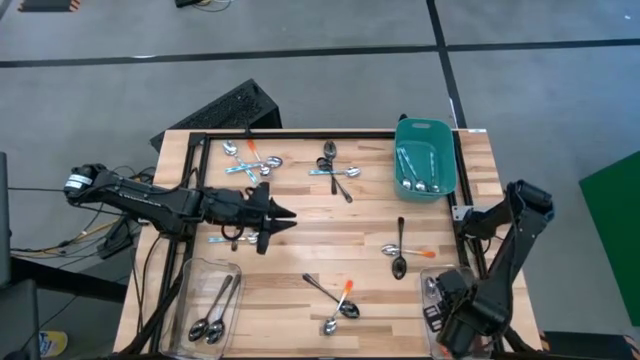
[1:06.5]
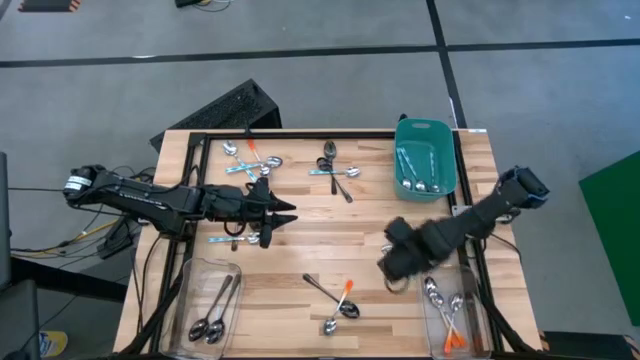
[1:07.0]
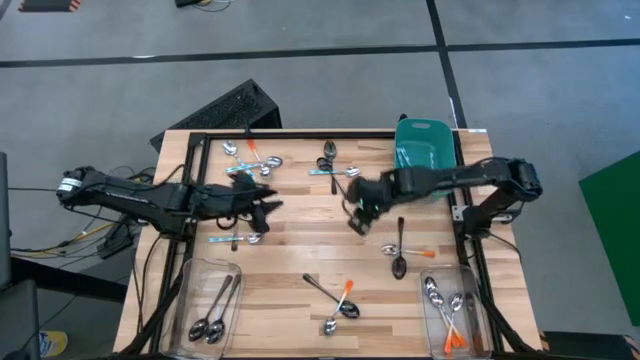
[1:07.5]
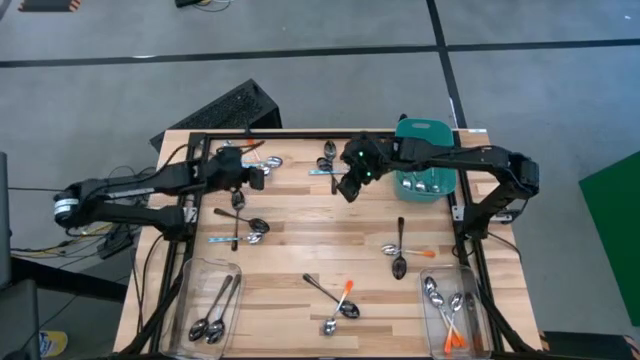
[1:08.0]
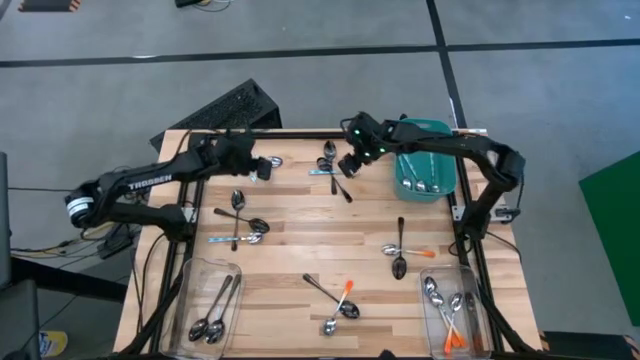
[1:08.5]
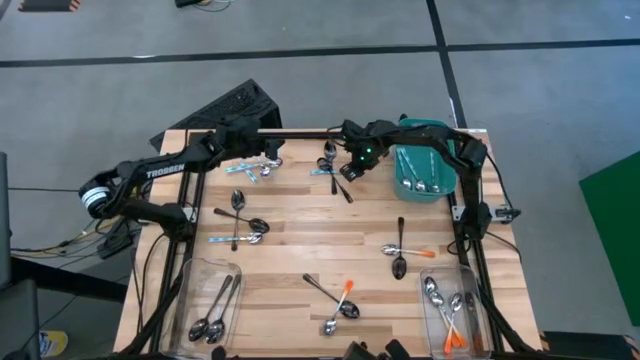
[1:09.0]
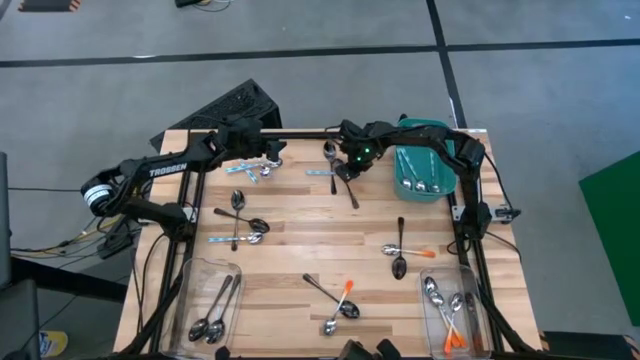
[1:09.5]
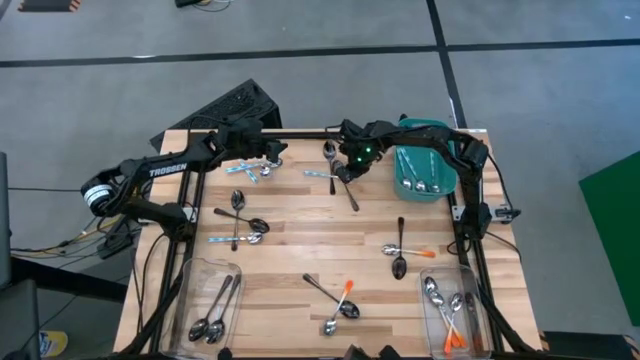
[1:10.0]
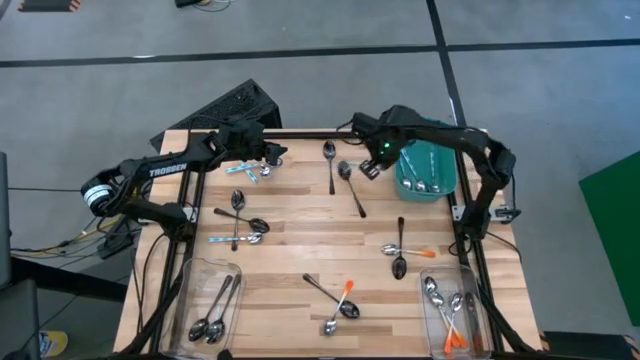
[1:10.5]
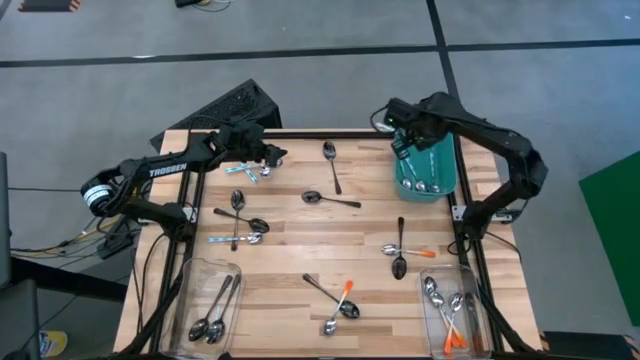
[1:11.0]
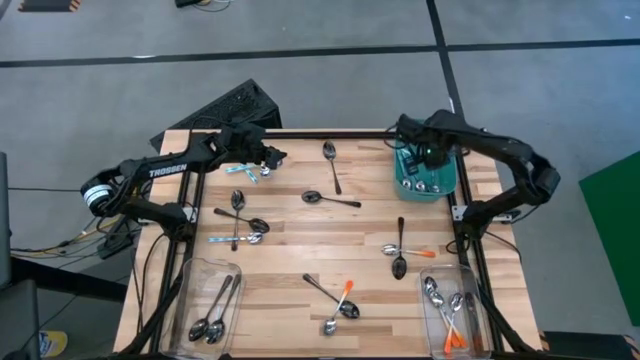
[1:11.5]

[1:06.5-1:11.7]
Task: Sort silverware by color (type)
Put the blue spoon in the blue bin

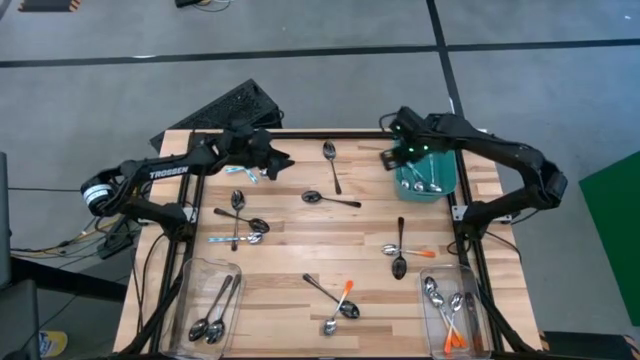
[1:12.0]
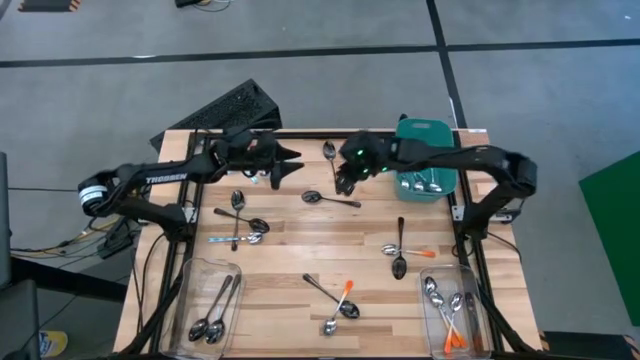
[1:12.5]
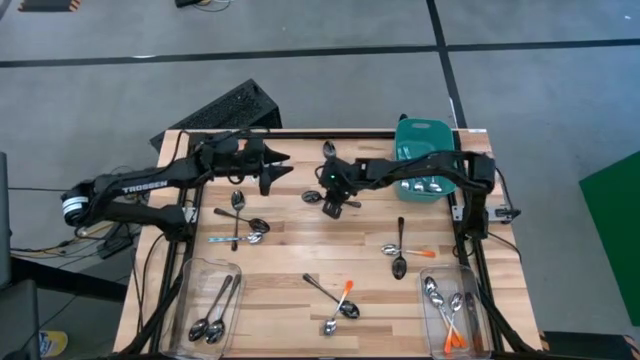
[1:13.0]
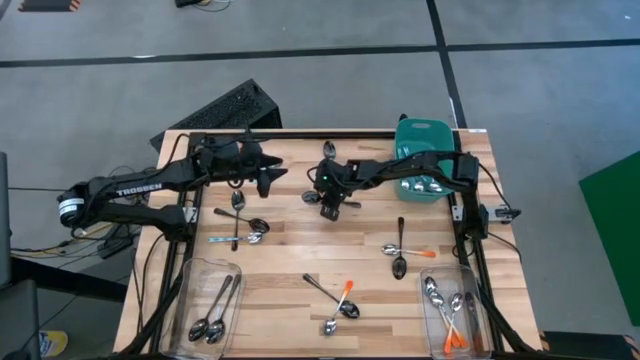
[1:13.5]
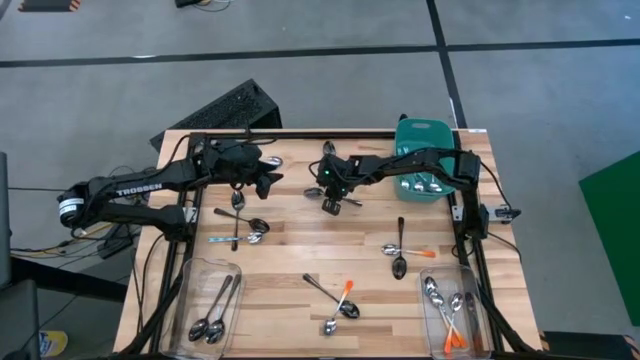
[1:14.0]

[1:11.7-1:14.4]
Put the black spoon into the left transparent bin

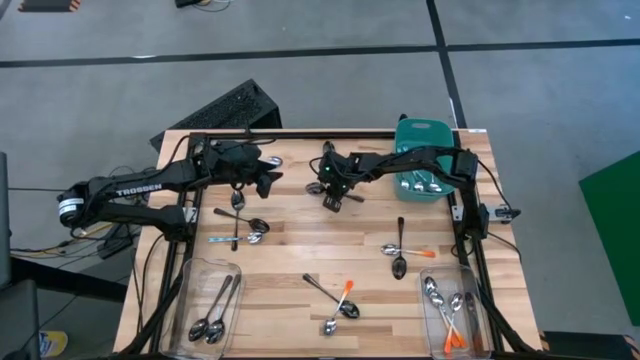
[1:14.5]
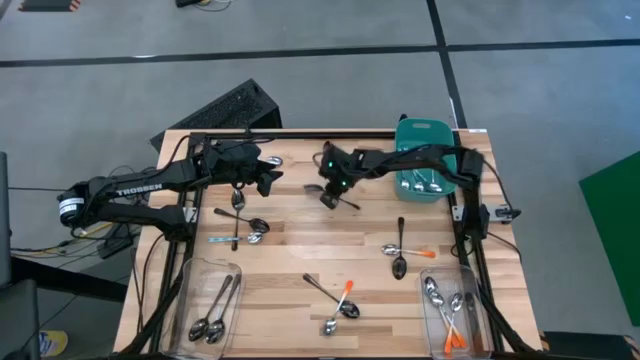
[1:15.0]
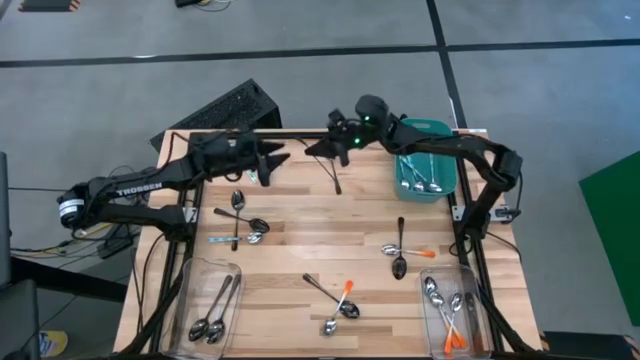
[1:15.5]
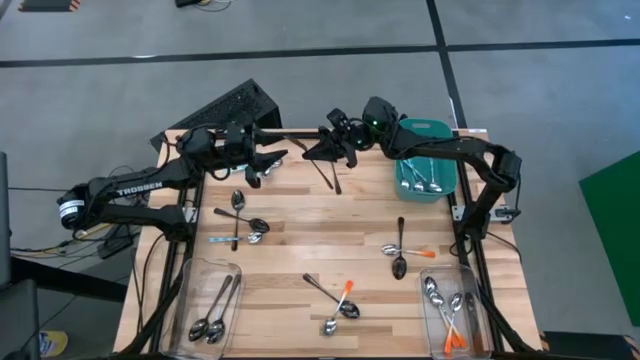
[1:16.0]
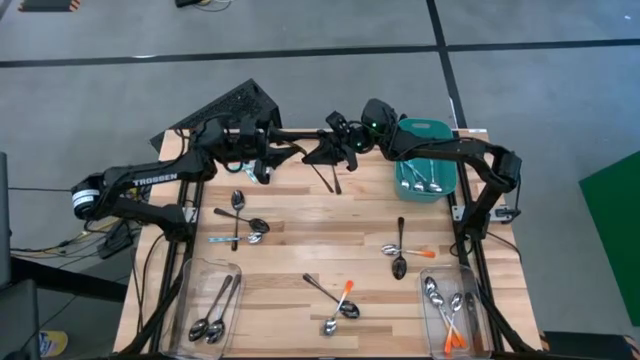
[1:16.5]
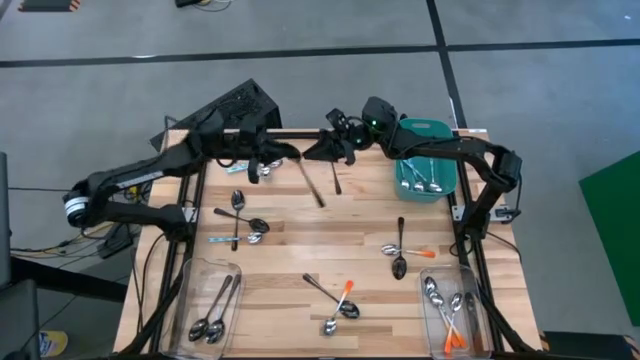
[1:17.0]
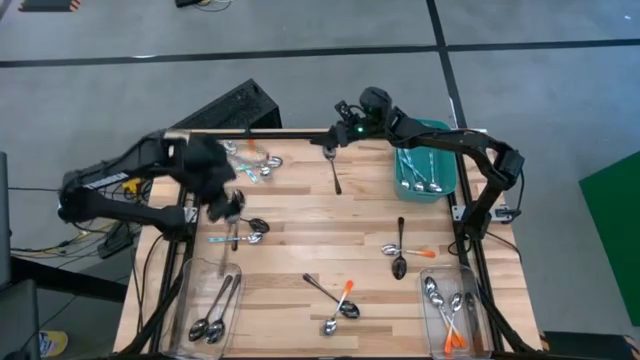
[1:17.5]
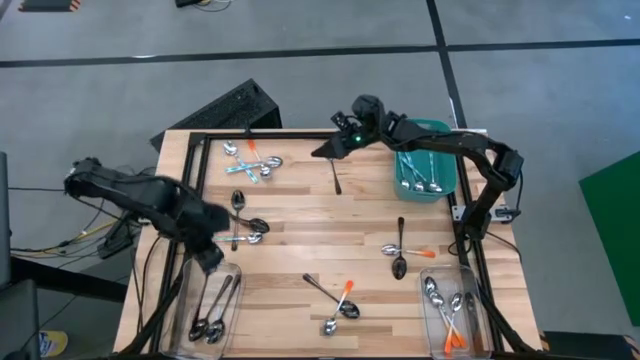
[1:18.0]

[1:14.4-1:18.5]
Put the black spoon into the left transparent bin

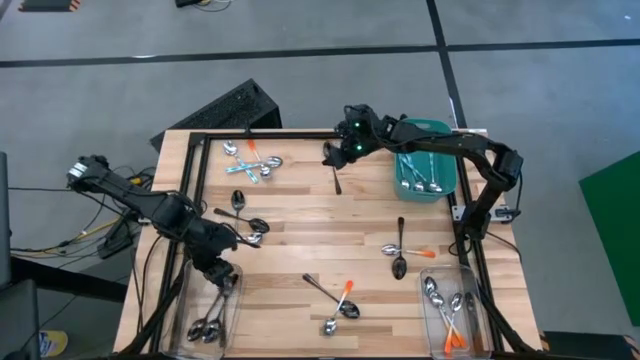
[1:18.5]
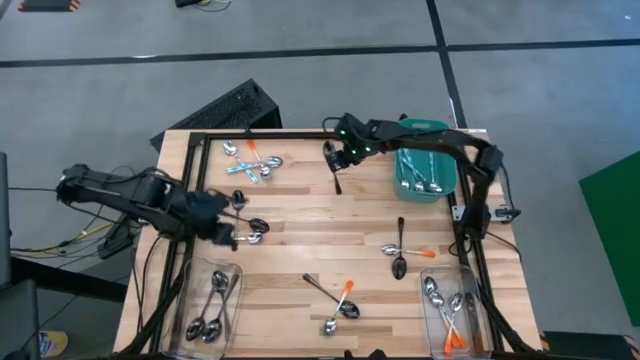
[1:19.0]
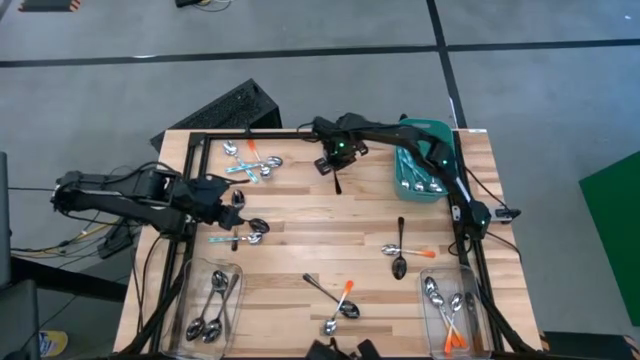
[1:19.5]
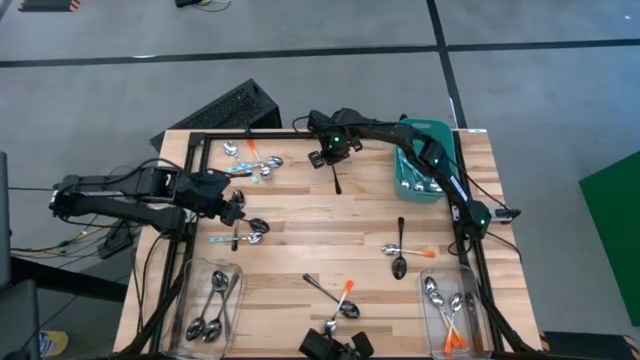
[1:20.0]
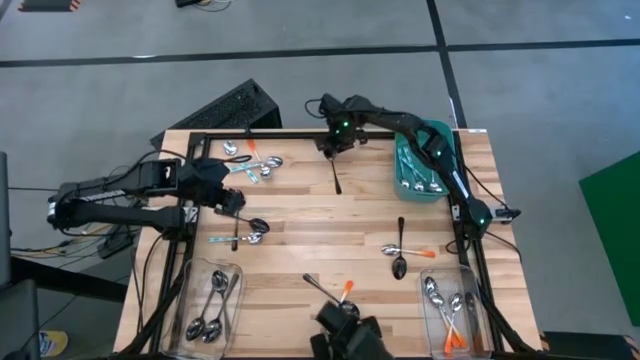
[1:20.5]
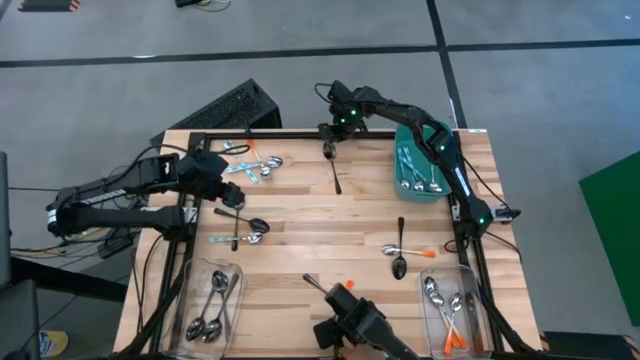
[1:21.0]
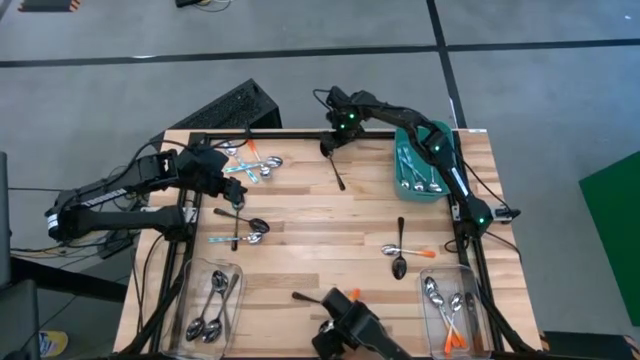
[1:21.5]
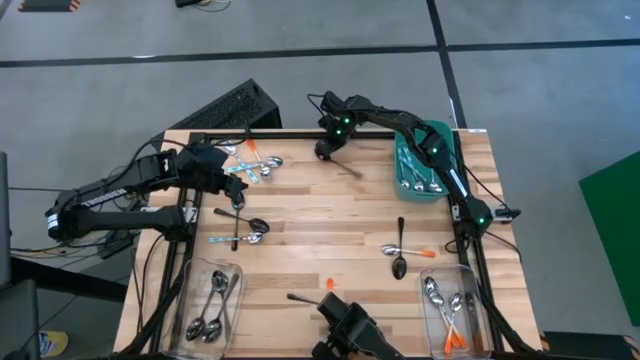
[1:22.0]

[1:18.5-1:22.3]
Put the black spoon into the left transparent bin

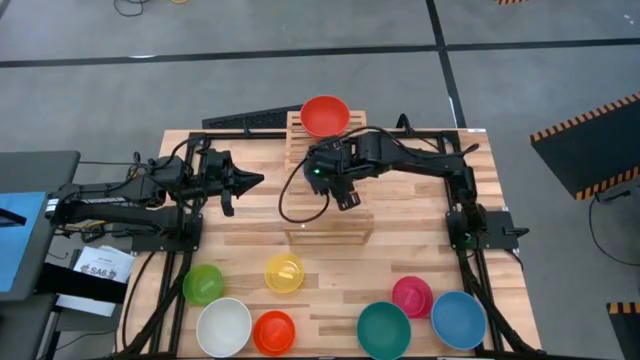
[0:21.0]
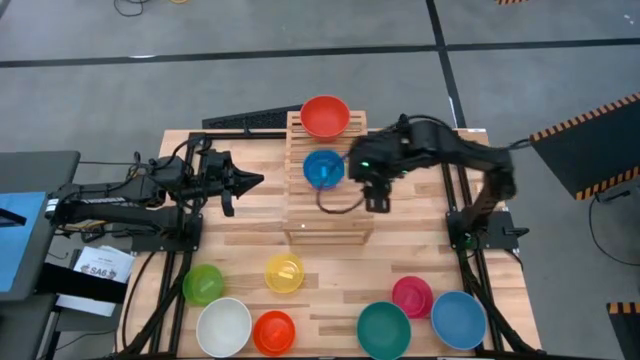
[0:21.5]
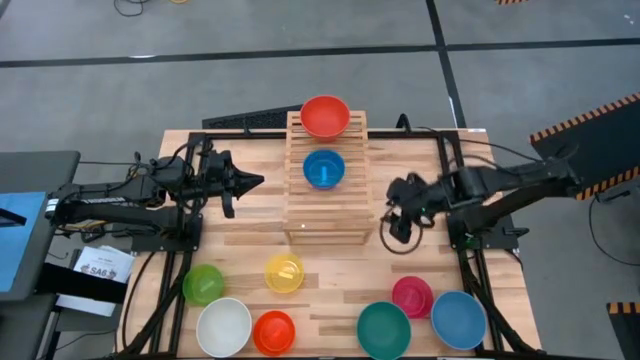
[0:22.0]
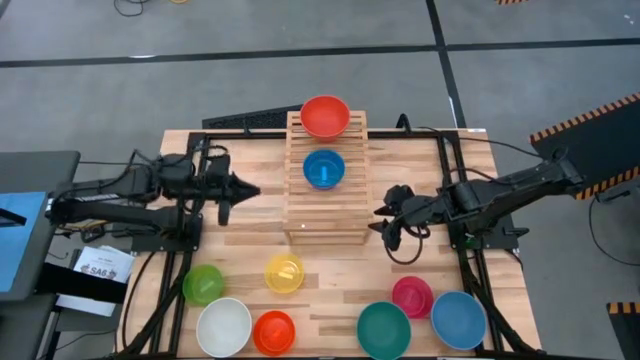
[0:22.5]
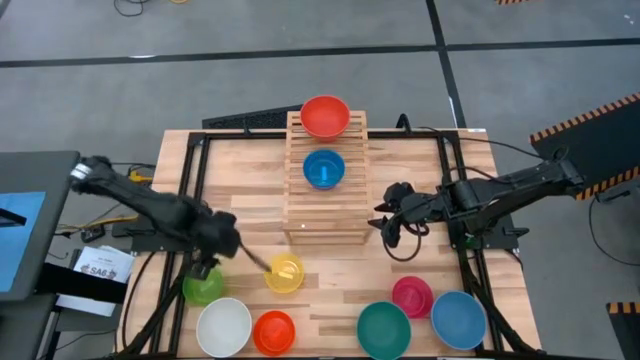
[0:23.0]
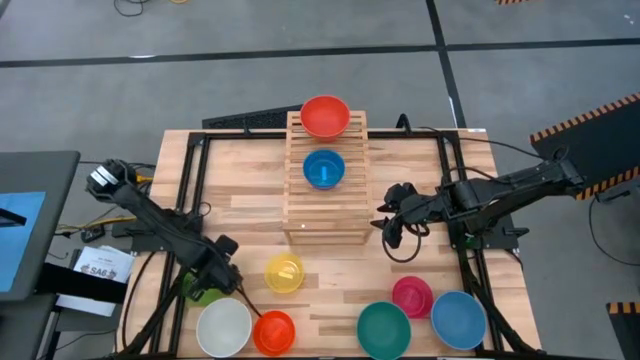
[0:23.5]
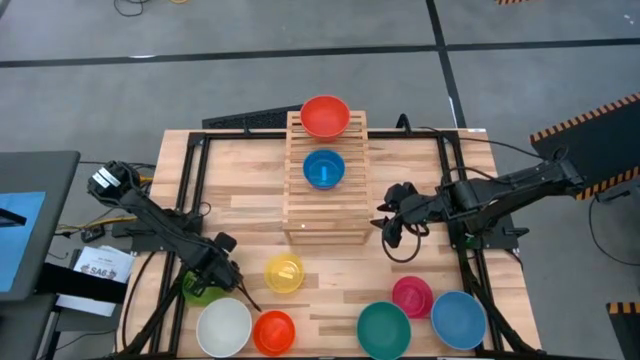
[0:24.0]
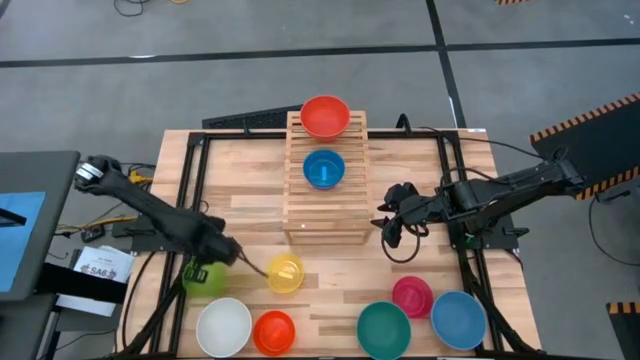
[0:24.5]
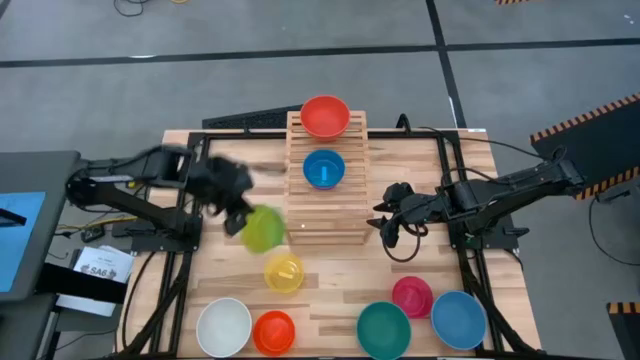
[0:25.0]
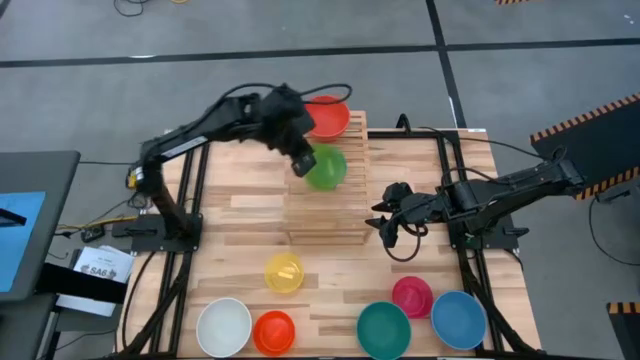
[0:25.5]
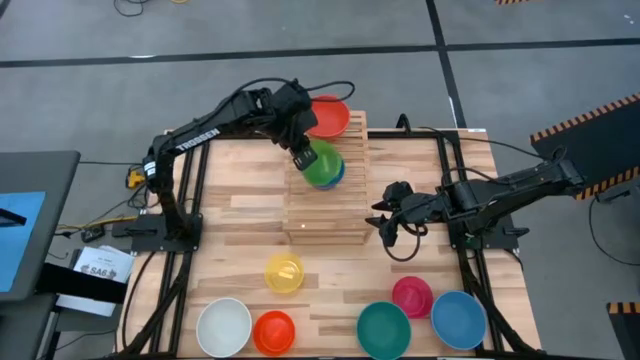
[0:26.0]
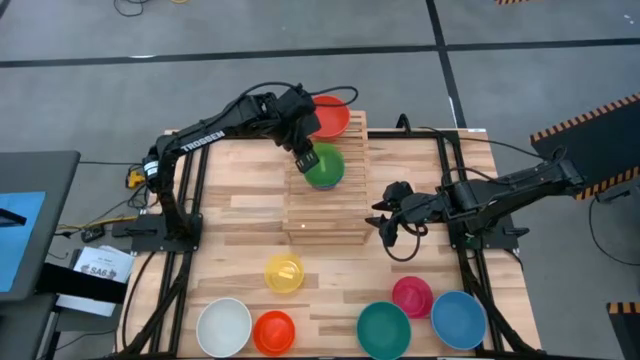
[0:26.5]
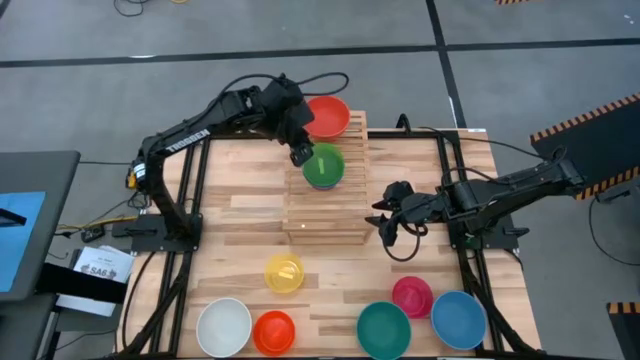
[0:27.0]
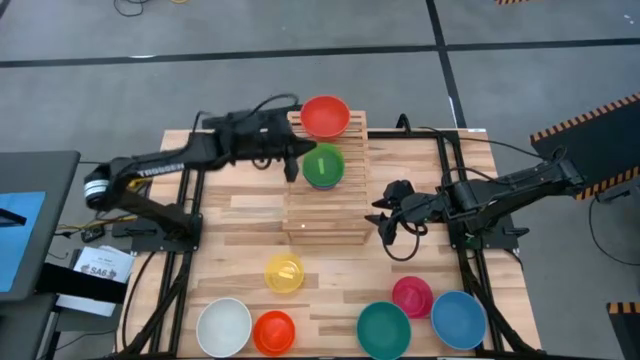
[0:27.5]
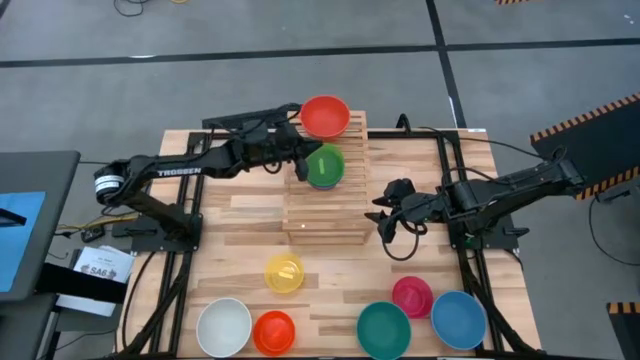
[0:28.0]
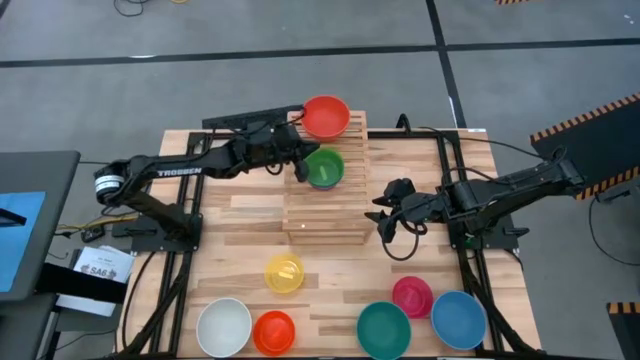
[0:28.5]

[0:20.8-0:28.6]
Task: Place and stack bowls onto a shelf
Stack the small green bowl on top of the small blue bowl on the shelf
